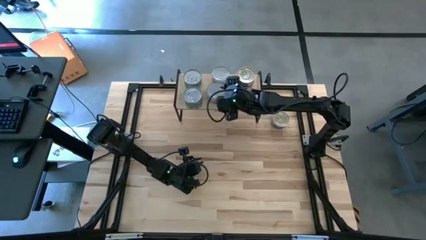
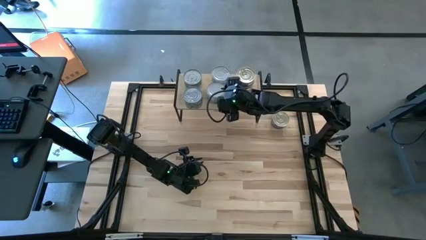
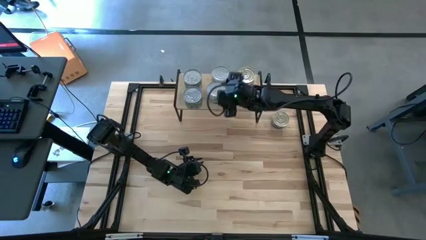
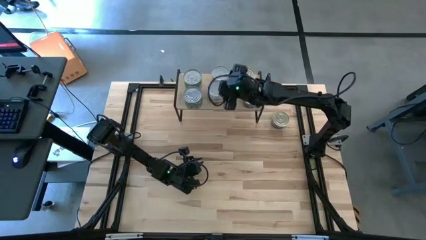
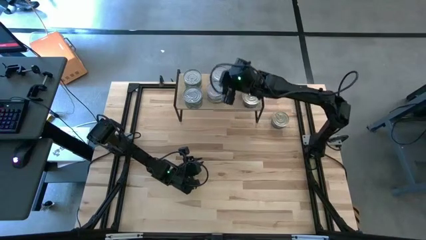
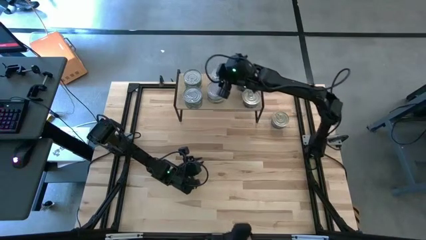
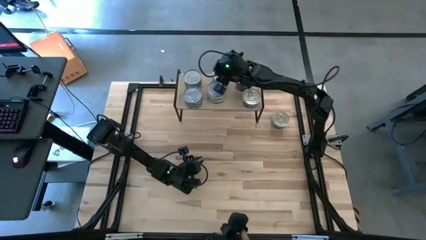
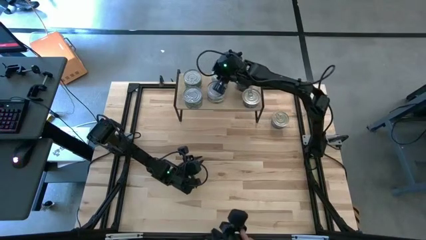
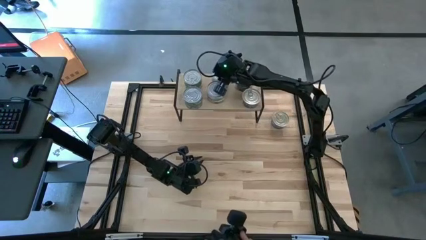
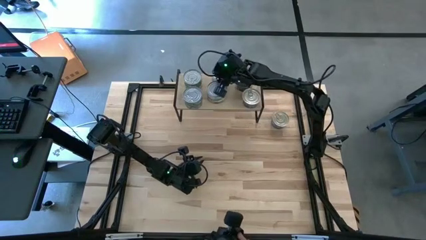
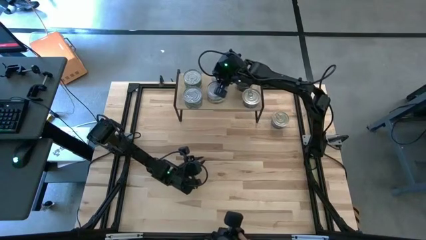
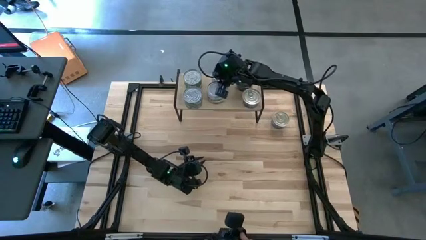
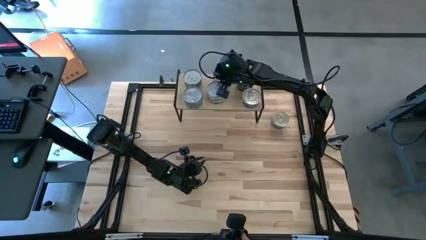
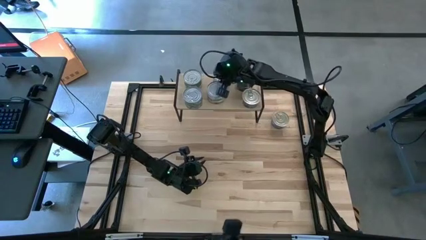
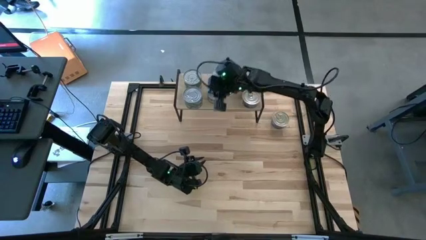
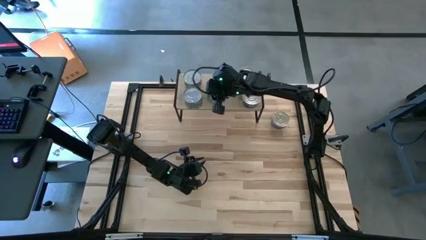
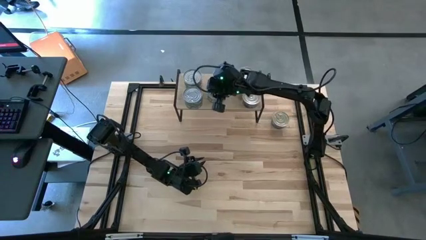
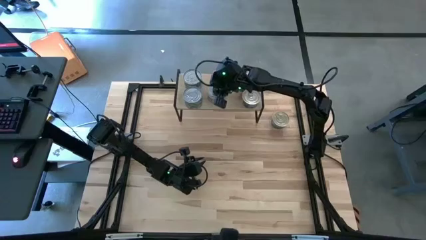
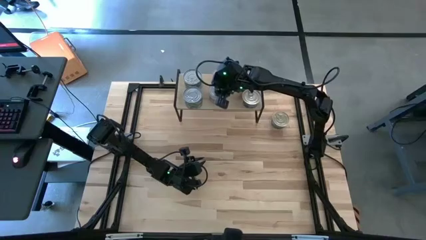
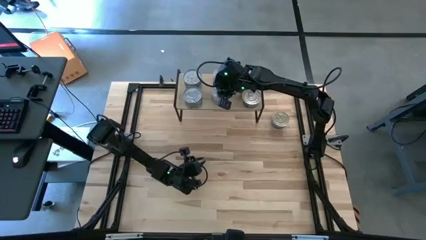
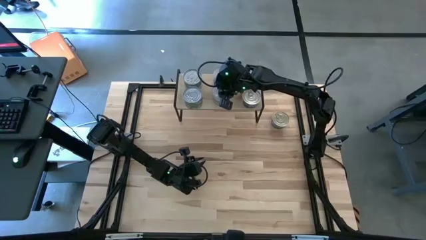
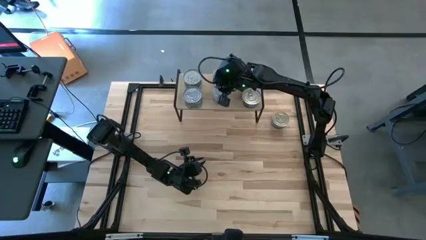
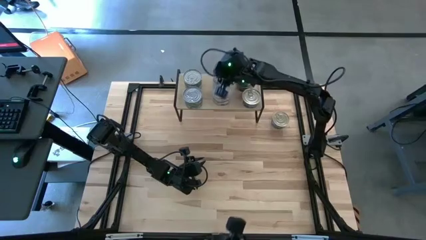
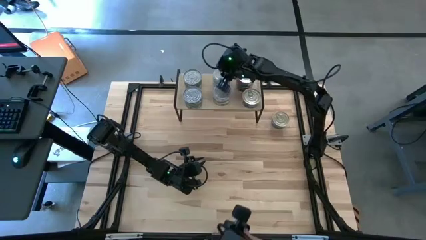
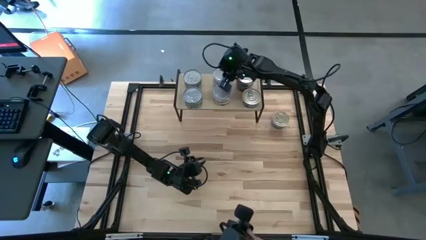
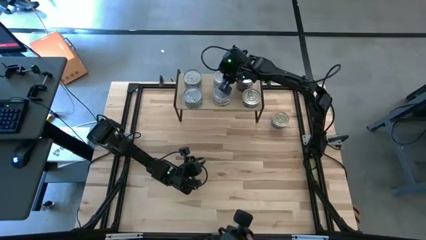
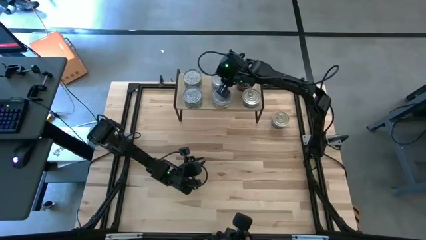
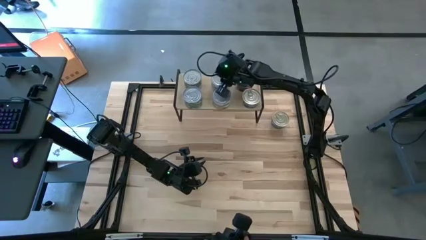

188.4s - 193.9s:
Task: Stack canned seafood by type on shelf
Adjust the stacked light green cans

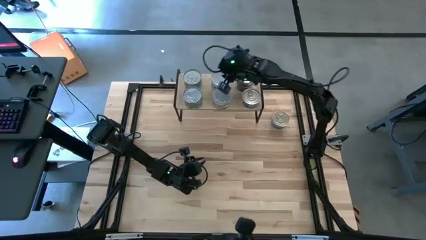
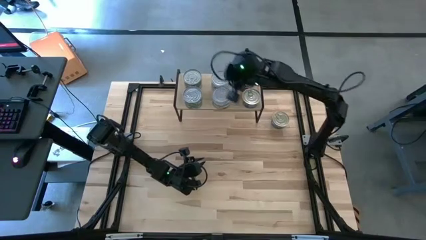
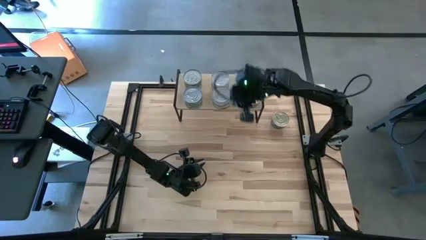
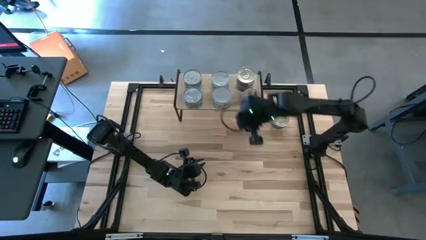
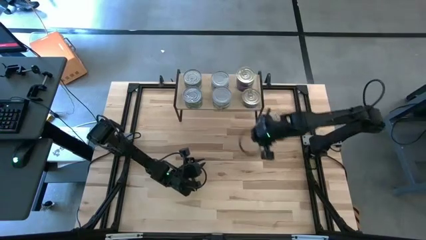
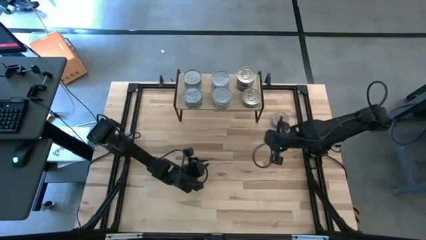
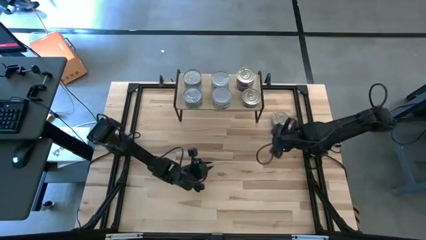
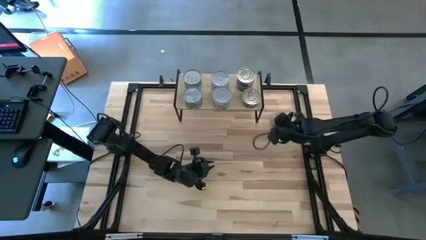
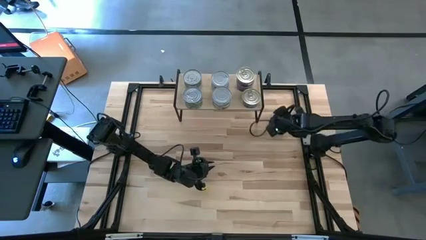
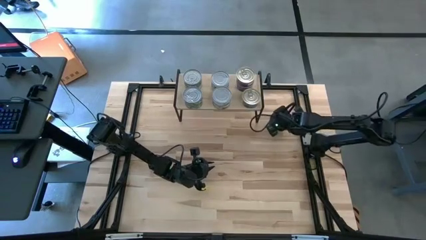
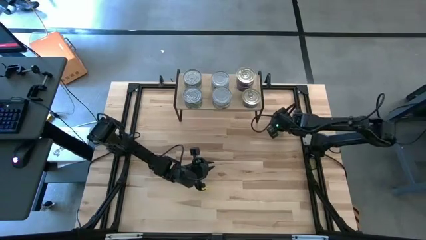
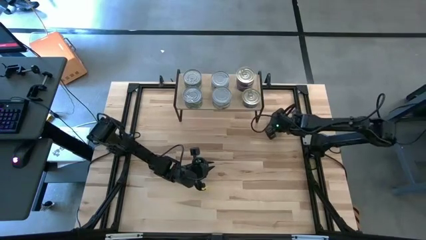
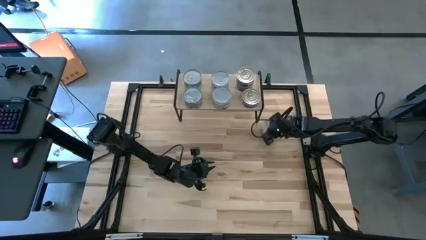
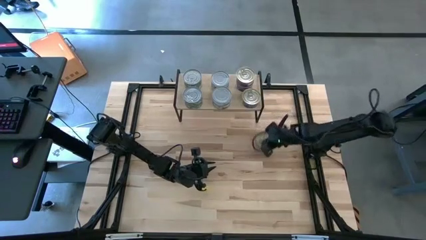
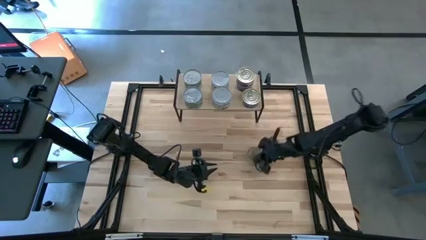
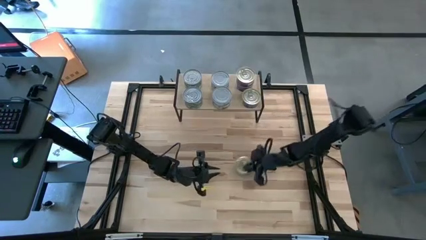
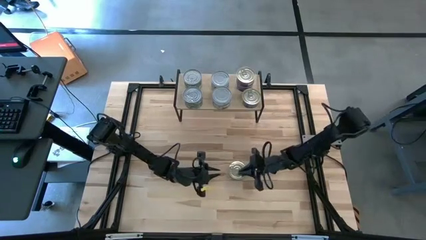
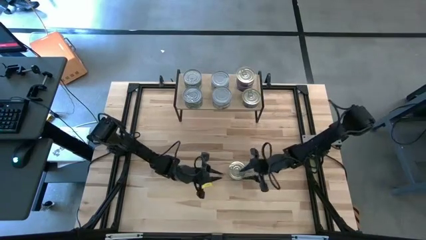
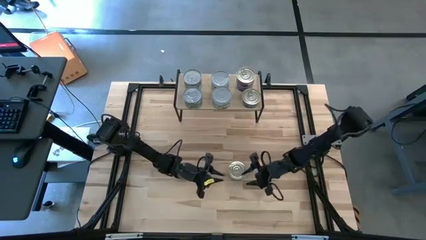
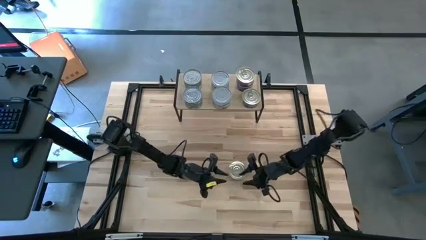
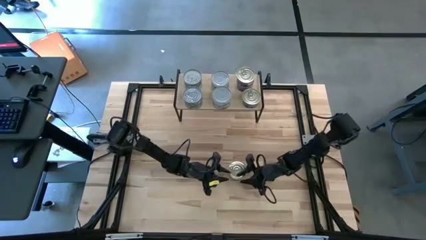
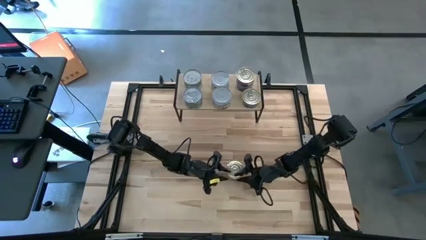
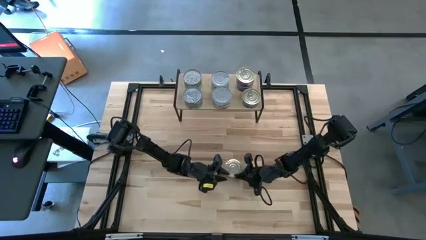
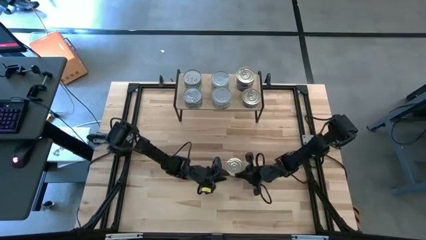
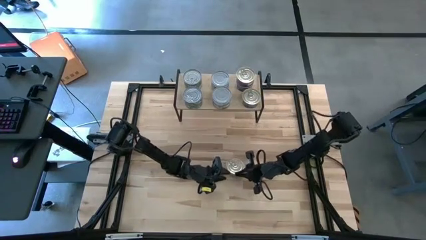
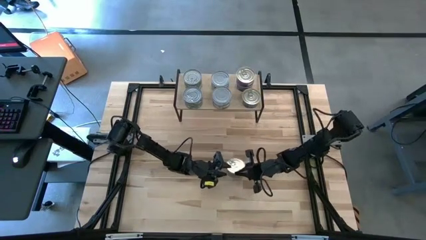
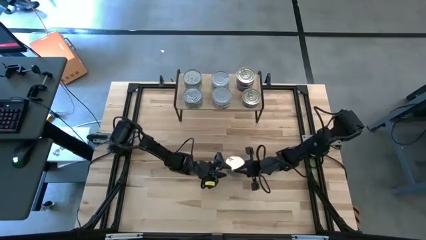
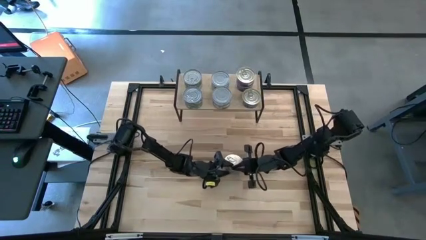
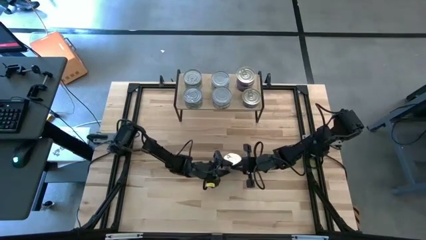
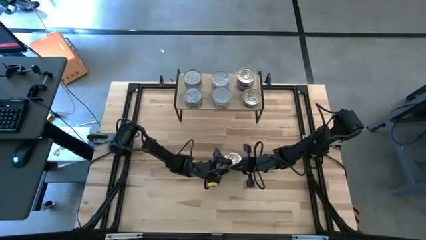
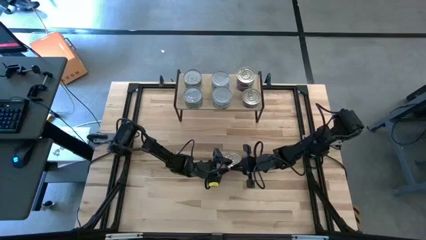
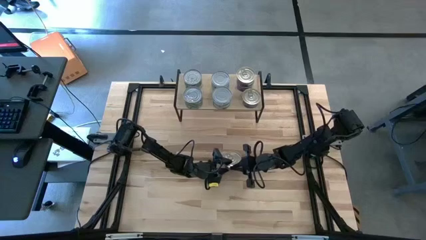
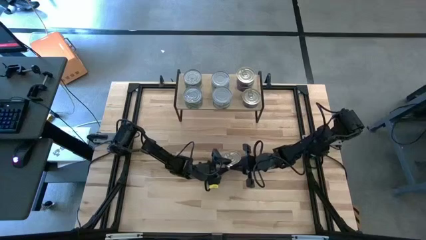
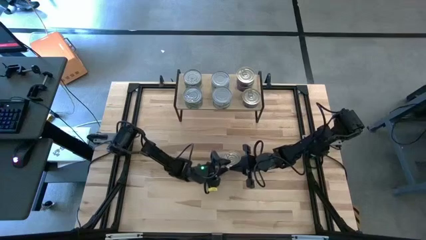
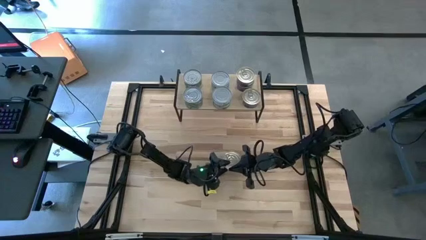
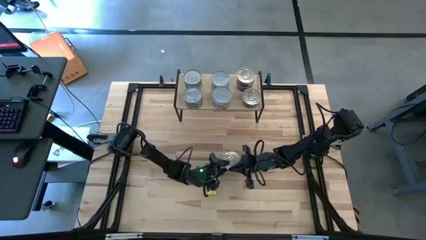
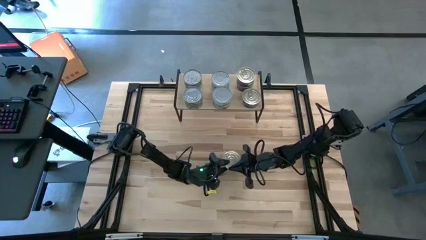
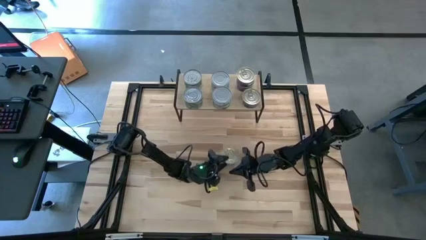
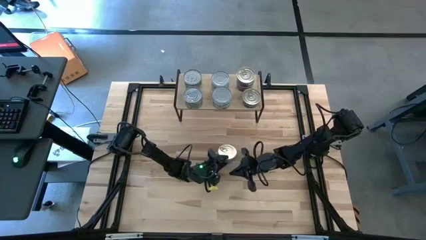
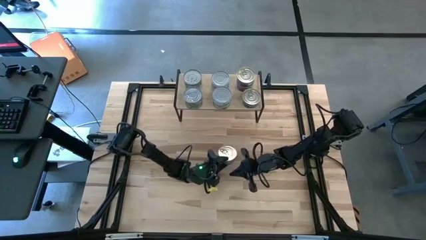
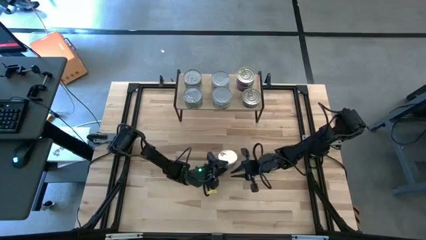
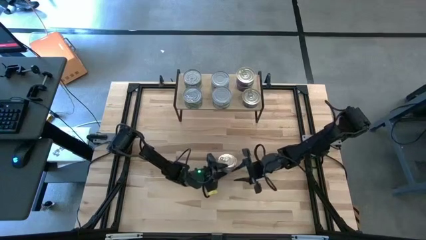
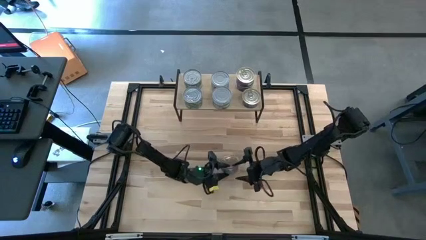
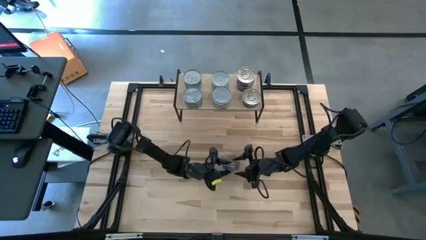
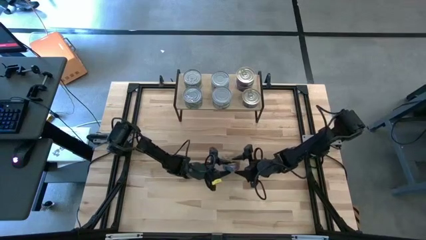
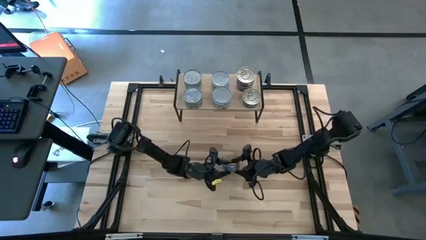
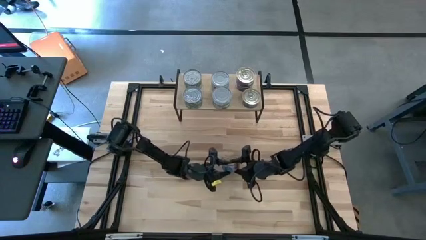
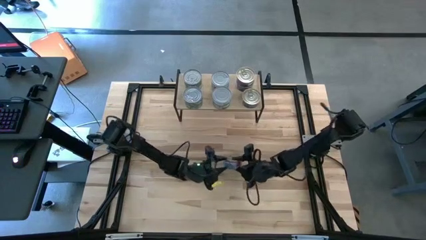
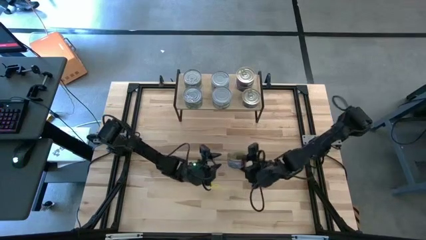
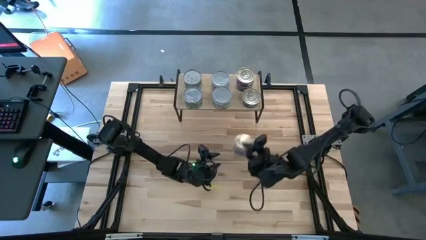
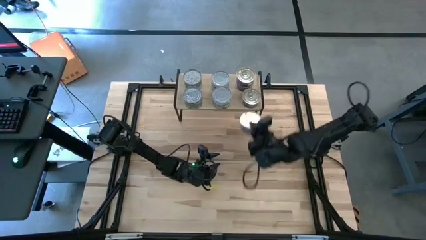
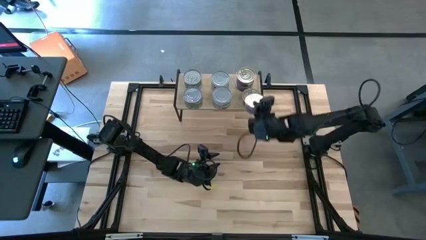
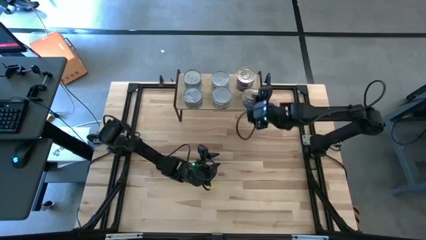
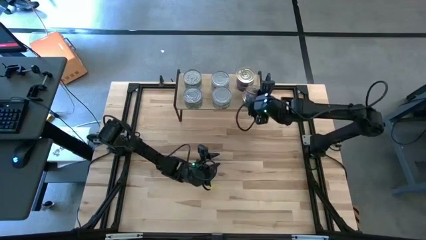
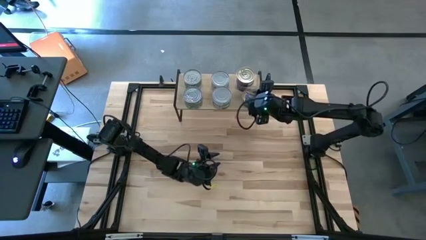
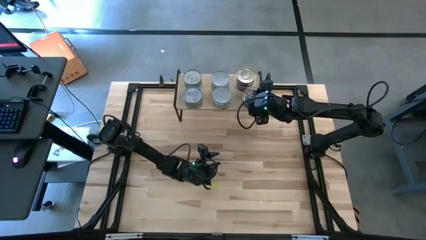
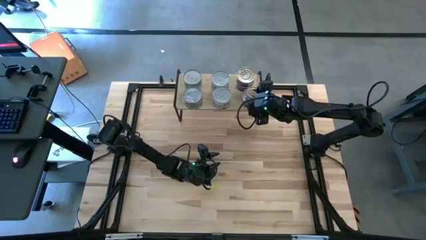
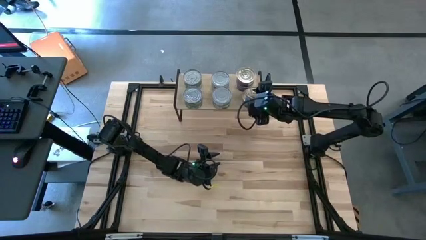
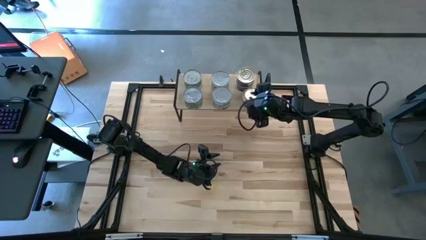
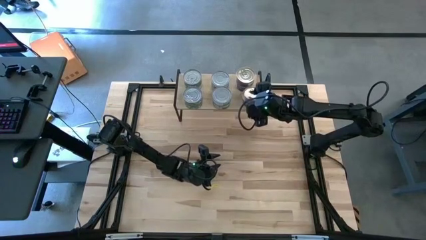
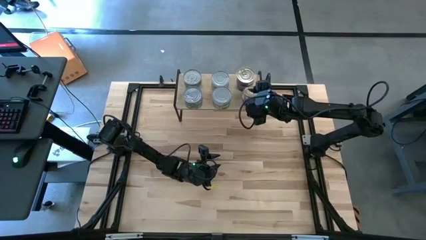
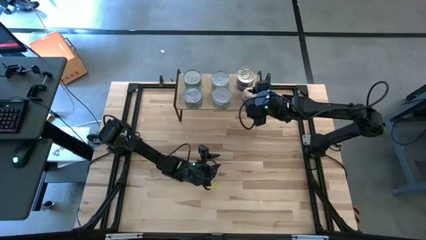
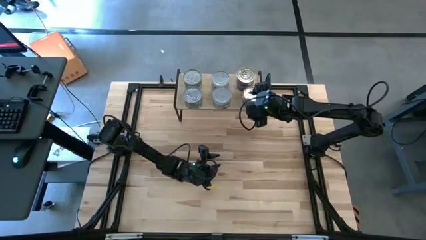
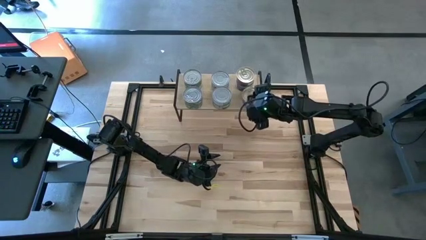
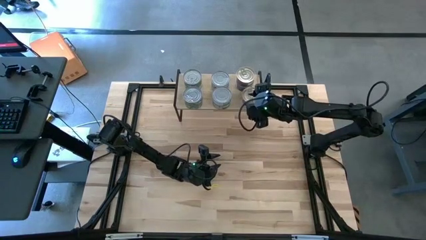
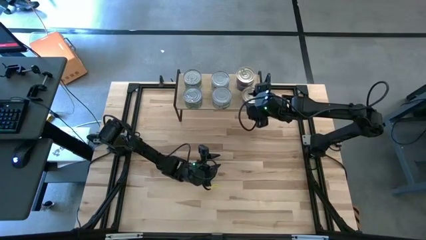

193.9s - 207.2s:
Stack the blue tuna can on top of the bottom blue tuna can on the shelf
